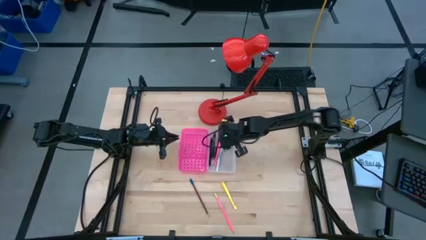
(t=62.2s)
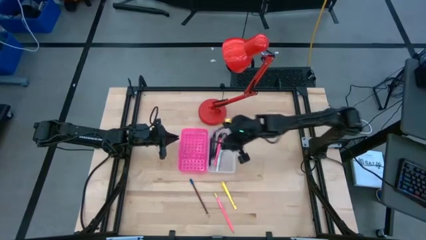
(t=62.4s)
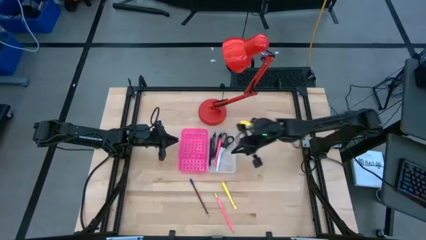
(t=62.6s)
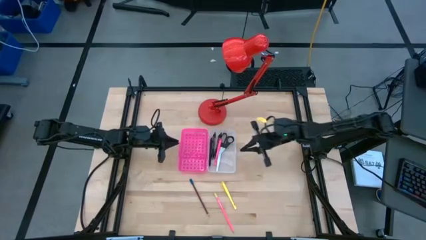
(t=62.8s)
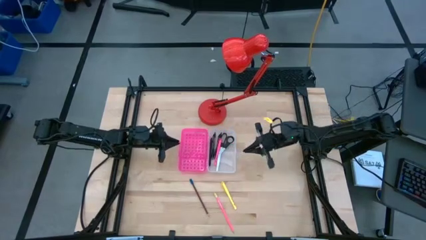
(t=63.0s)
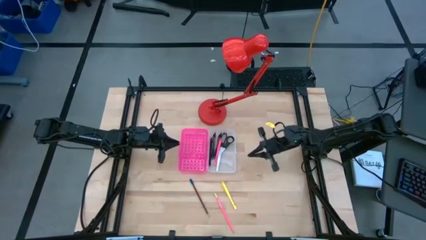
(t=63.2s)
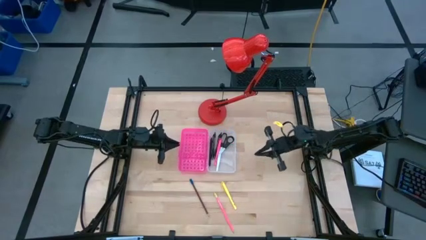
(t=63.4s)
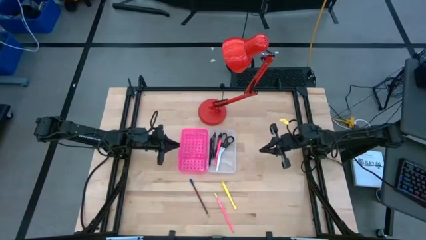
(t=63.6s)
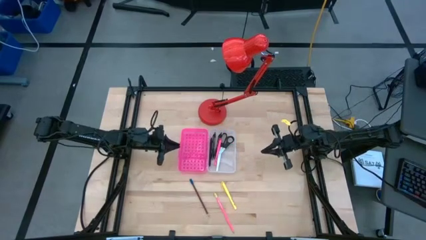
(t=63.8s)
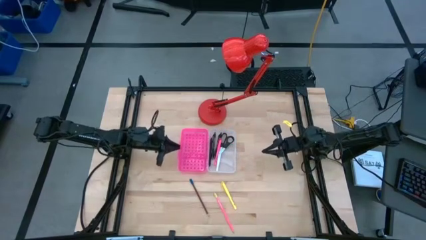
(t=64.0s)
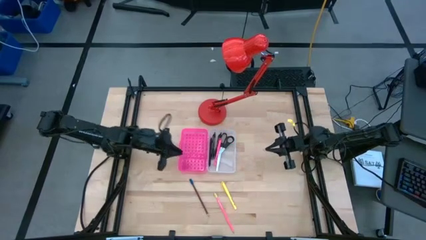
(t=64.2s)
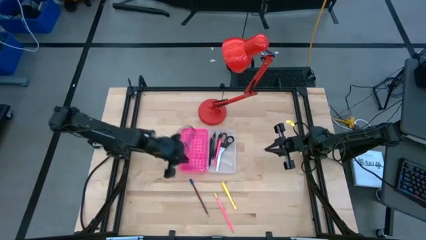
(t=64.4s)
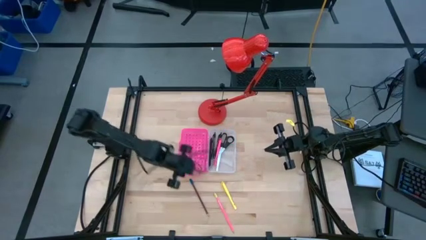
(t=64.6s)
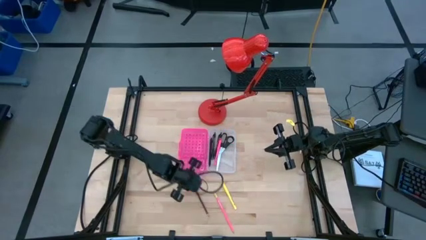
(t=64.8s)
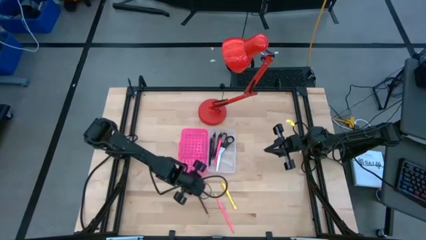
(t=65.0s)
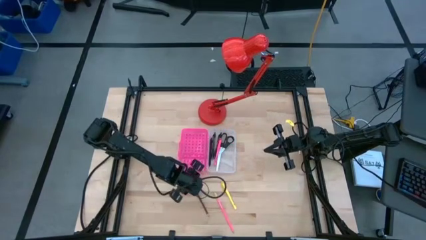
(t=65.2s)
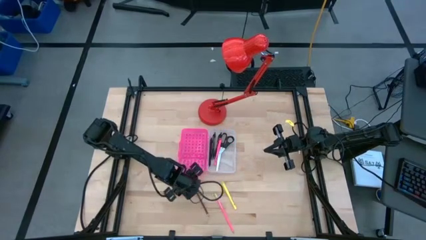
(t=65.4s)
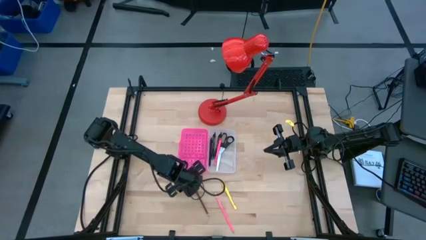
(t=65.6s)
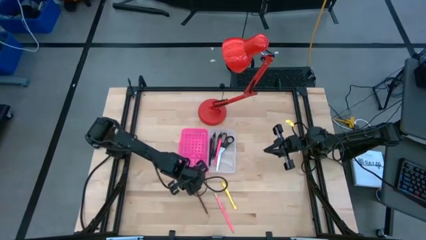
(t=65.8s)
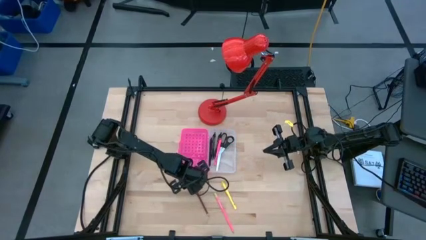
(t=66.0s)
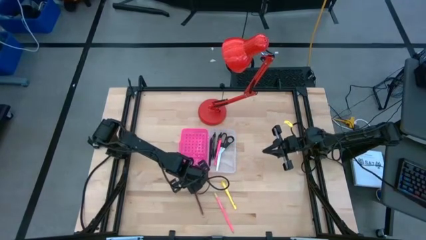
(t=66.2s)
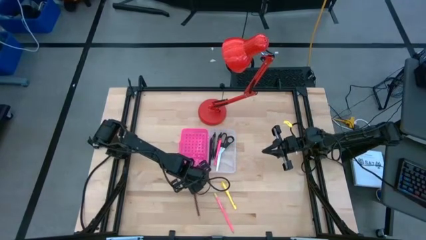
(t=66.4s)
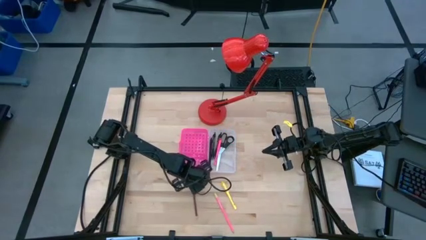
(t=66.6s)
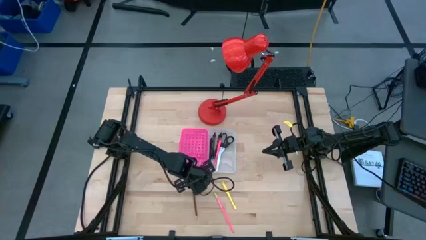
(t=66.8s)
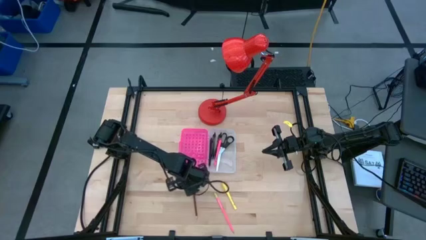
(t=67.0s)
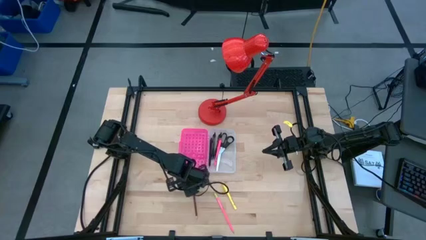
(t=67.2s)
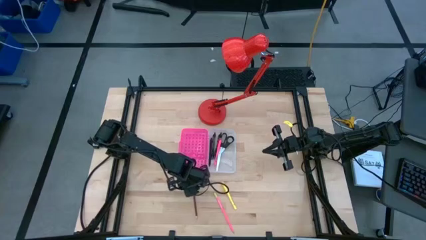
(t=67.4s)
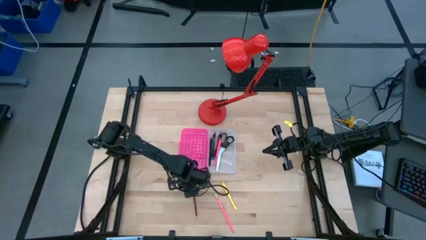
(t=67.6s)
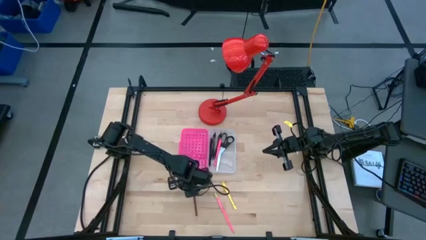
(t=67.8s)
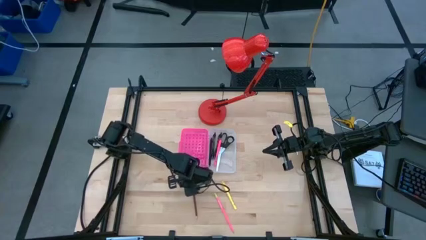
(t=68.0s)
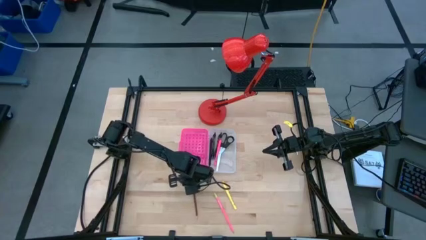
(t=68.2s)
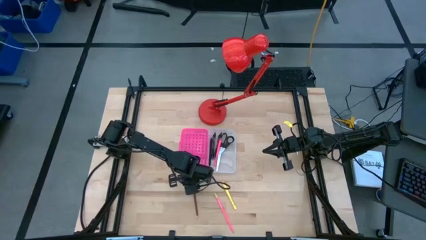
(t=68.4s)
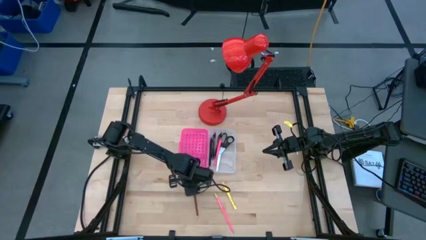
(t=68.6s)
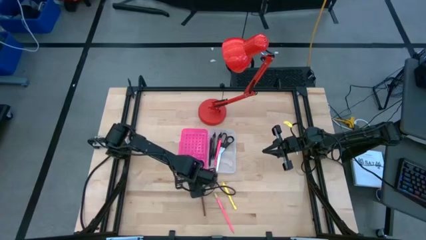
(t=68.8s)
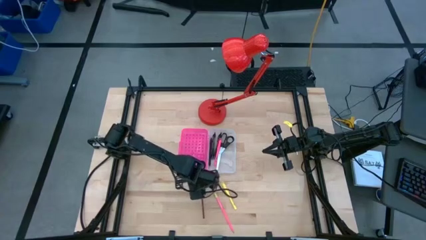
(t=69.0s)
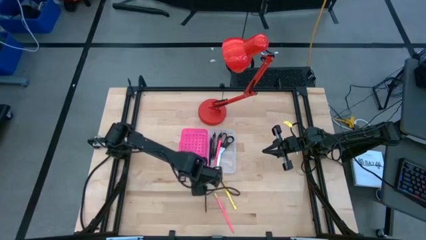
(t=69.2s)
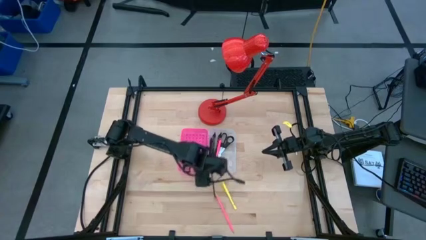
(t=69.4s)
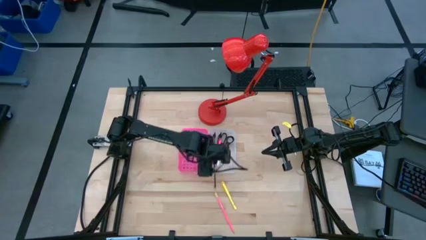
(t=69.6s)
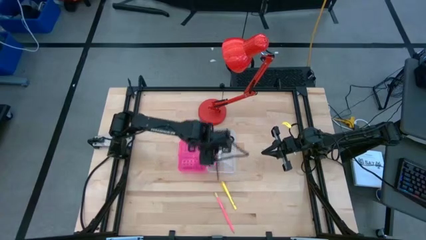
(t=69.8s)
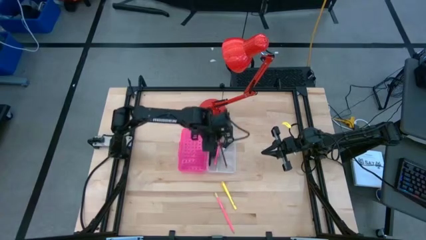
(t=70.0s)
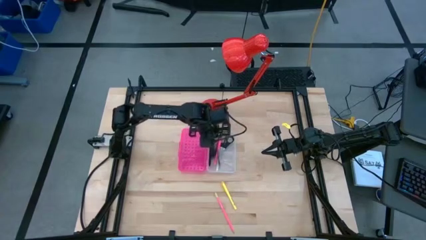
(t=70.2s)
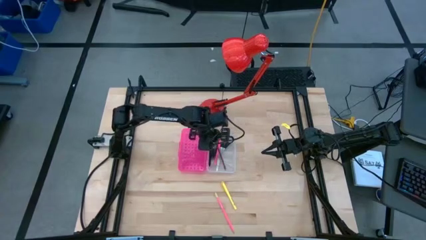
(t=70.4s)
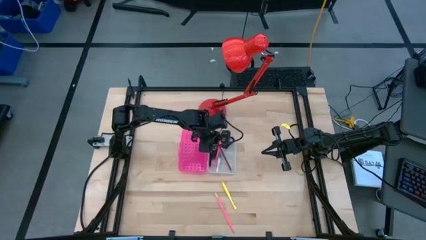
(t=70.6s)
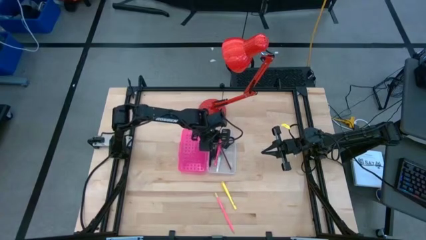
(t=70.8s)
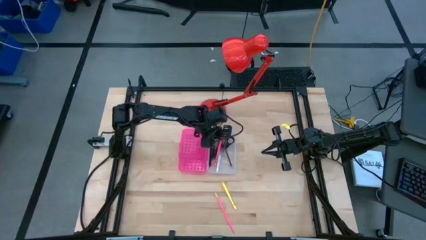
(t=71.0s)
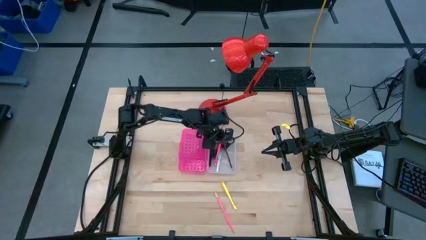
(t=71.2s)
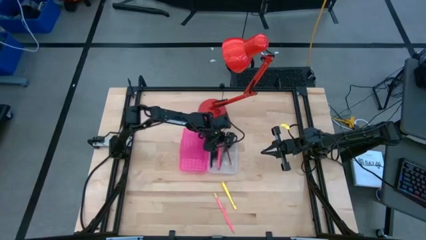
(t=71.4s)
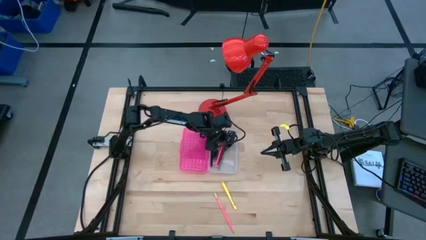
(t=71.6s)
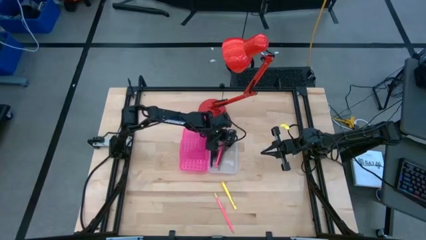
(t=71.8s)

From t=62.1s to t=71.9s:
Task: Pick & place school supplies into a supply box
Put the brown pencil into the supply box

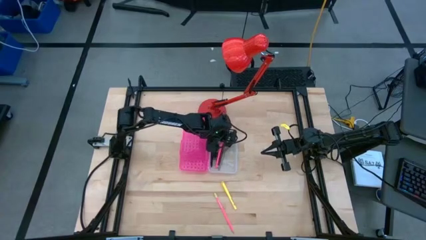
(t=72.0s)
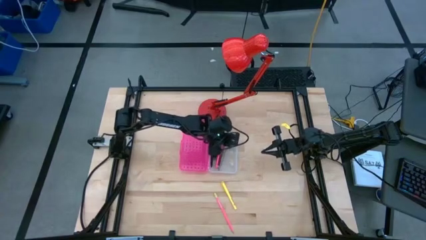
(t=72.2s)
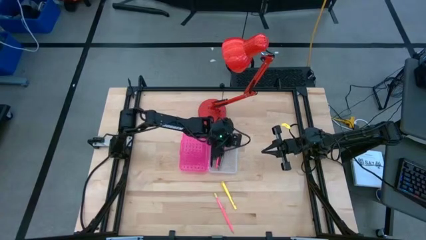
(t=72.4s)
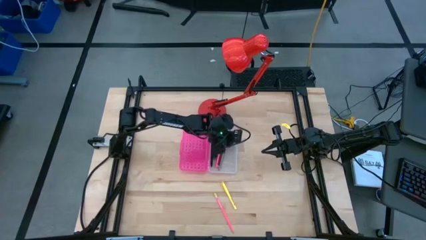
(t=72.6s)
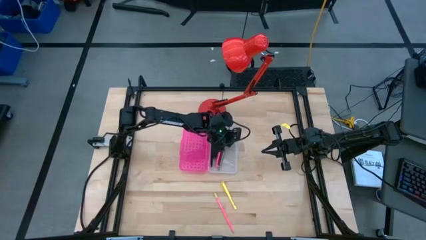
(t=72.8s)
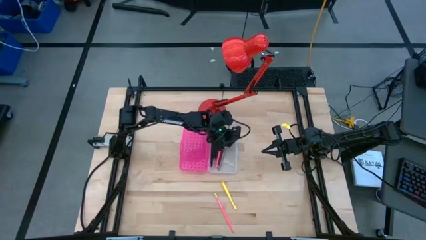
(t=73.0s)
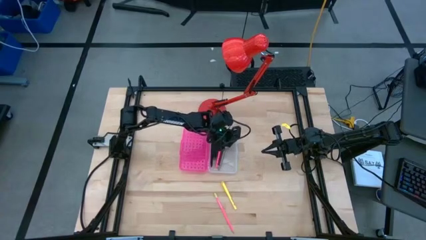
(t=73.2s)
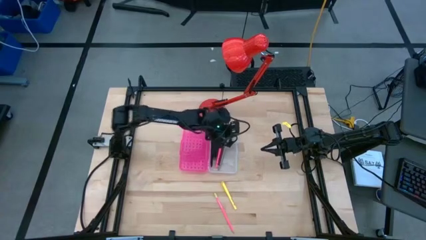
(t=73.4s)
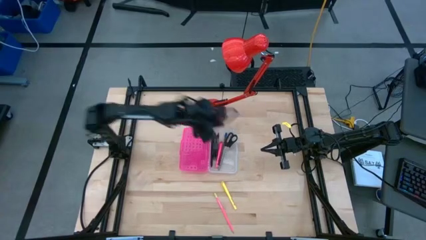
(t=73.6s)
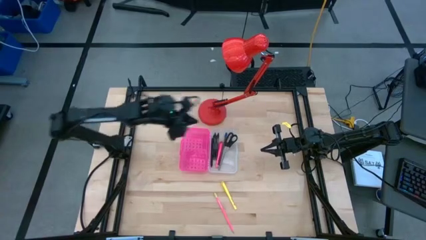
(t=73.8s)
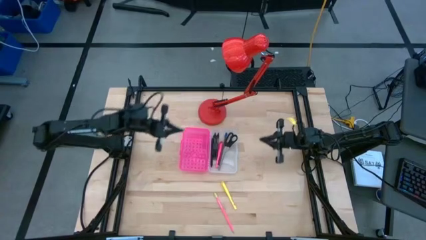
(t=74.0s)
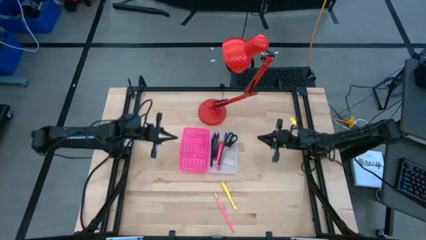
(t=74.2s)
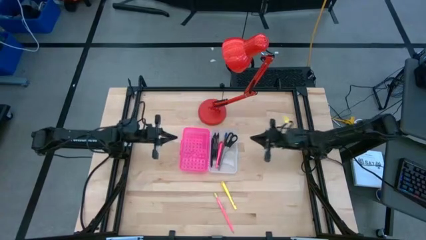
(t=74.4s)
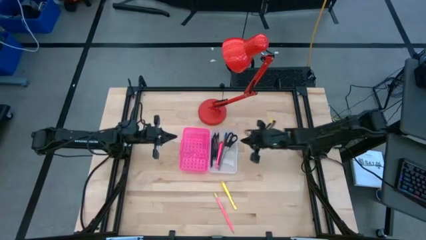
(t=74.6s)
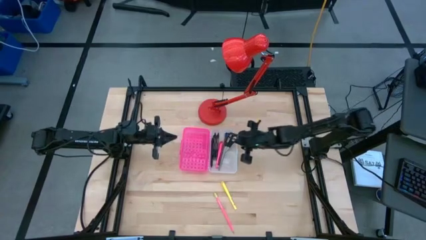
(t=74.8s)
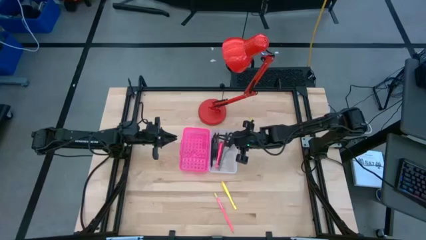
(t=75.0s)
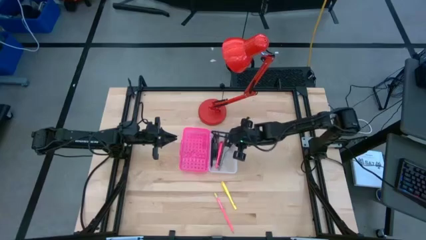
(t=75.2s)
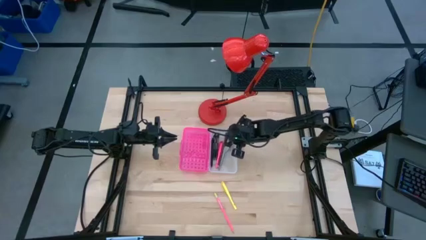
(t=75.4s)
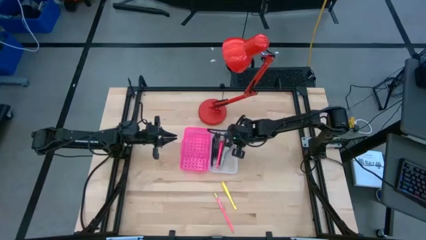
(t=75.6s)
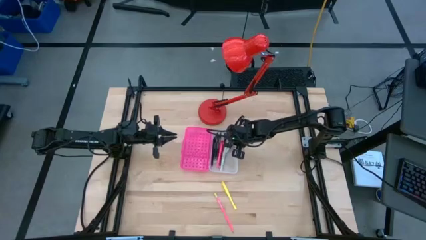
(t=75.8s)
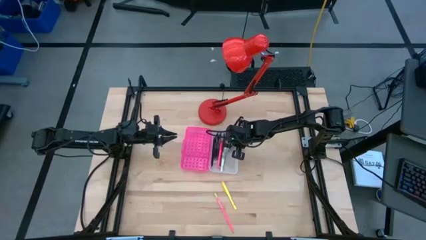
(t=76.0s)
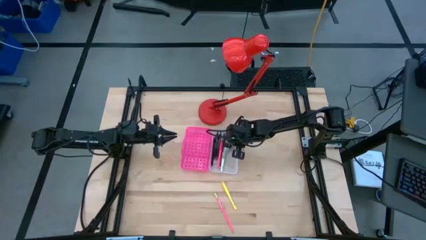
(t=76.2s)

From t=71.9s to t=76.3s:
Adjust the scissors into the supply box
